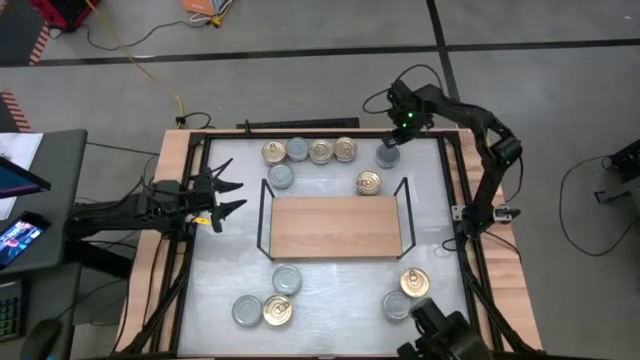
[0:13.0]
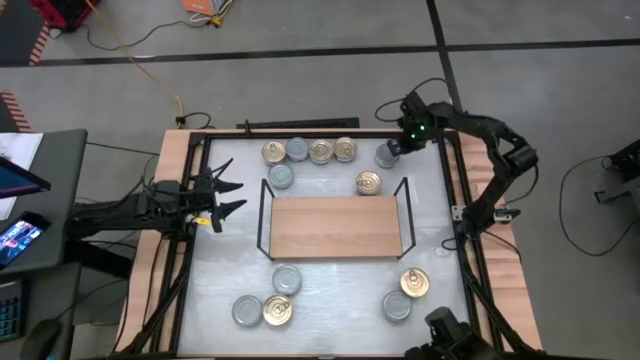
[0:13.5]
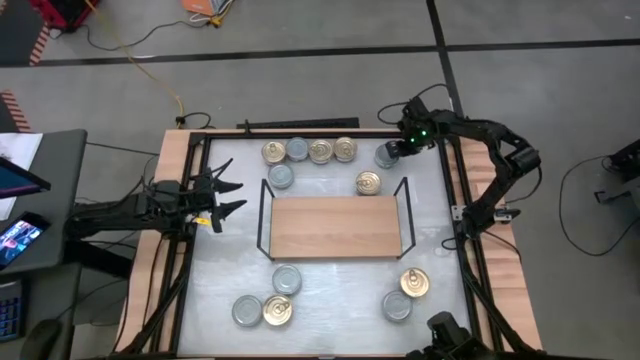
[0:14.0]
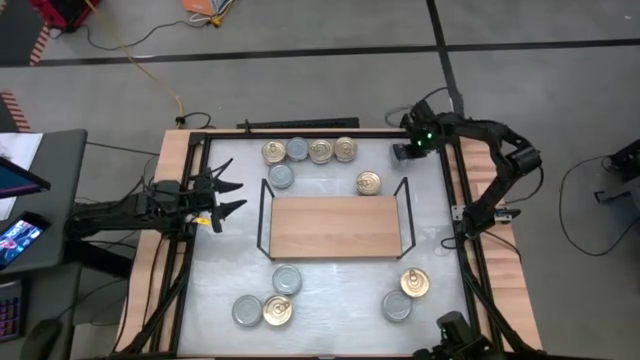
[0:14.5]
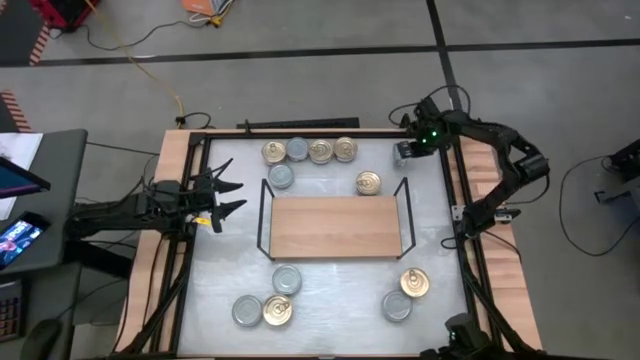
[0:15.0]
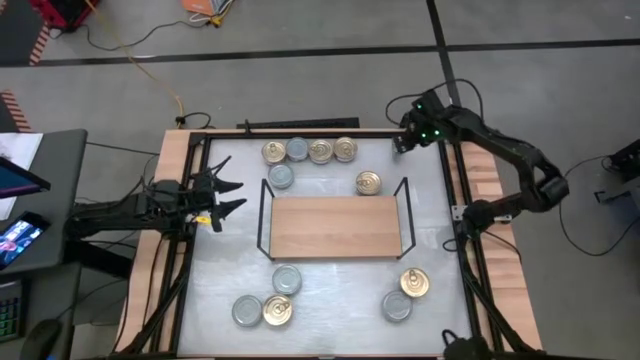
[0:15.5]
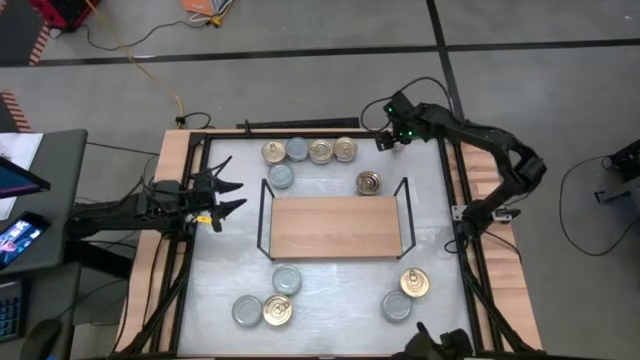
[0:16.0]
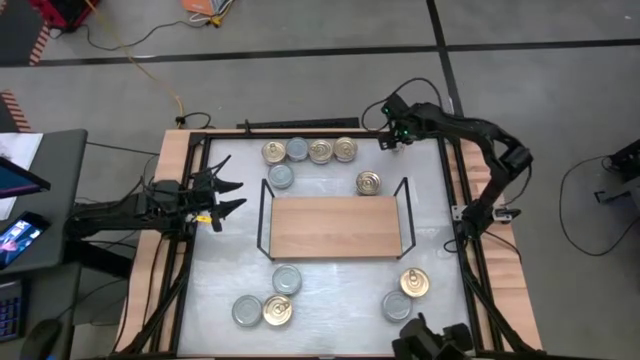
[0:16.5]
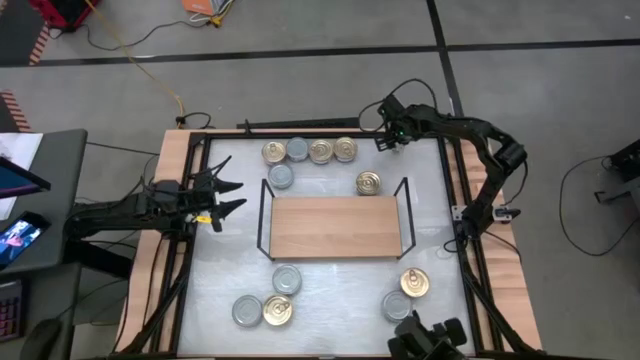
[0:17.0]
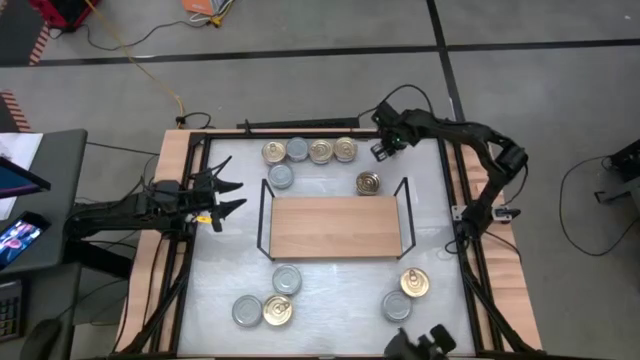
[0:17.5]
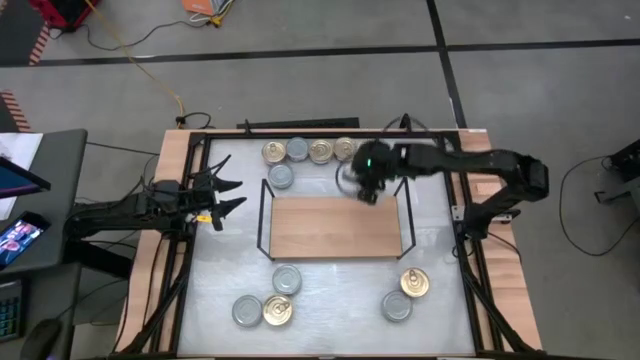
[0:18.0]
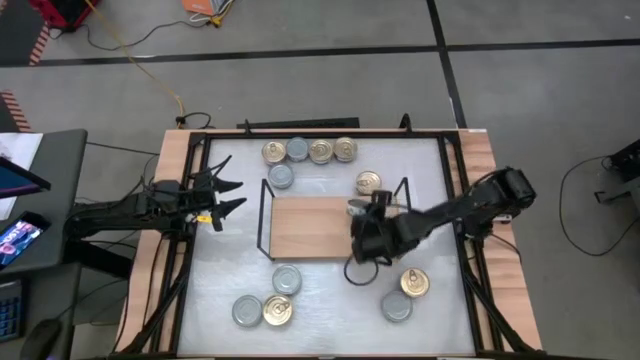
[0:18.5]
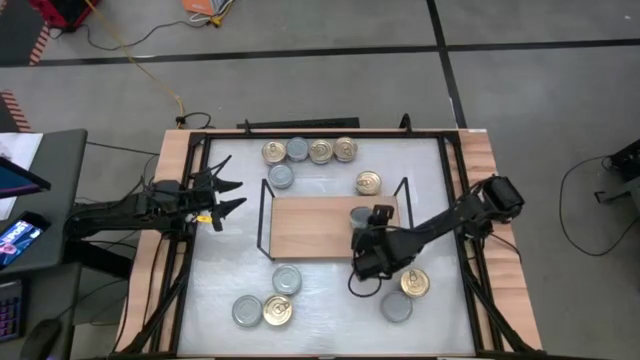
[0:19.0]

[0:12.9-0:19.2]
Task: Stack canned seafood by type on shelf
Put the green tuna can on the shelf

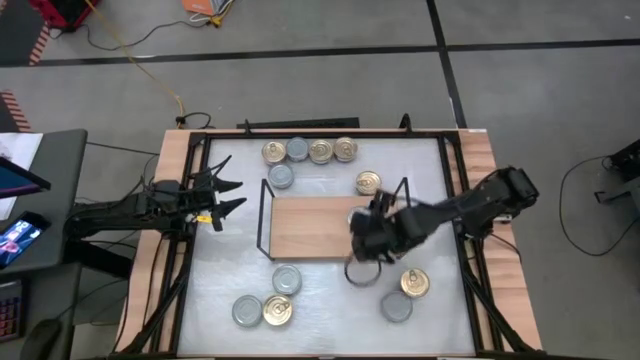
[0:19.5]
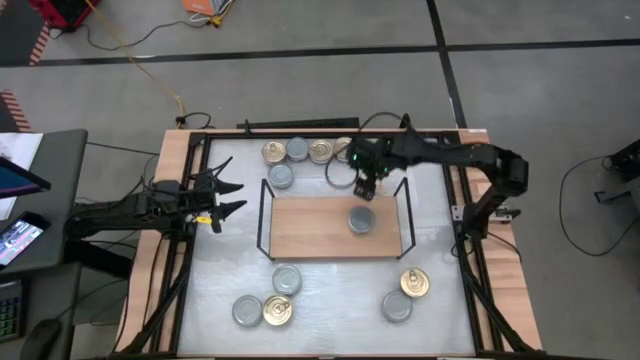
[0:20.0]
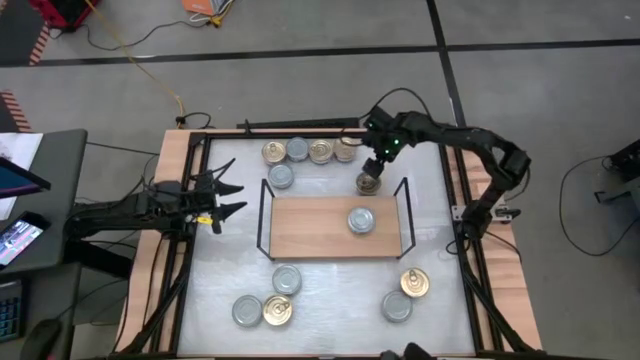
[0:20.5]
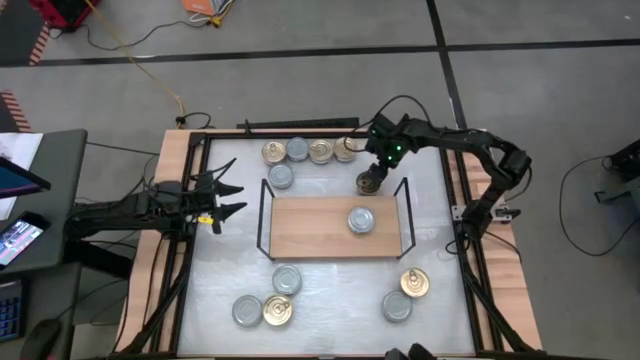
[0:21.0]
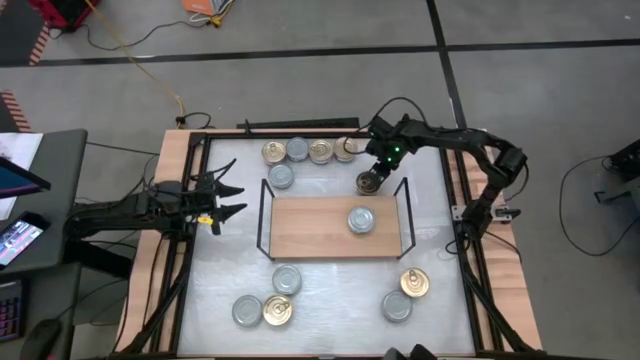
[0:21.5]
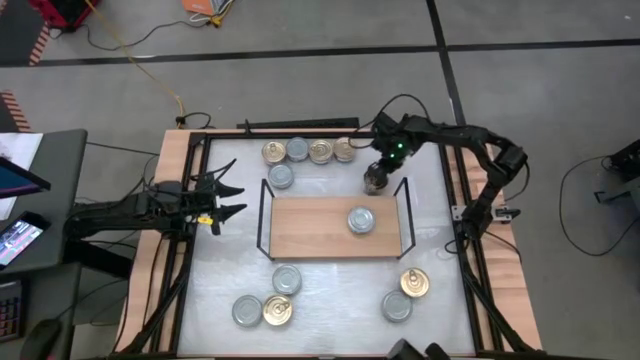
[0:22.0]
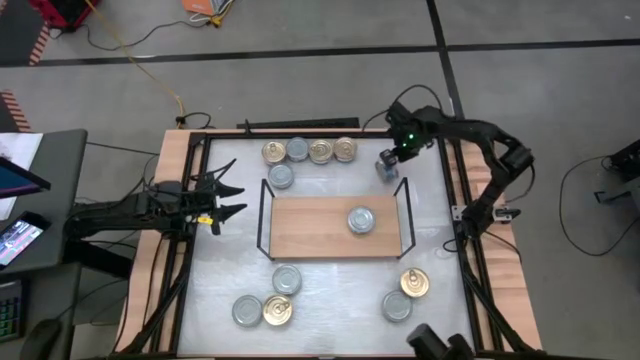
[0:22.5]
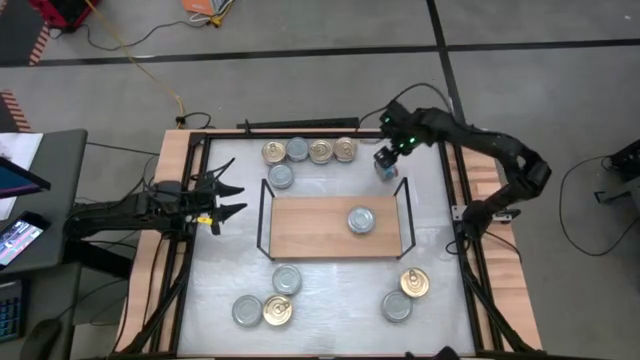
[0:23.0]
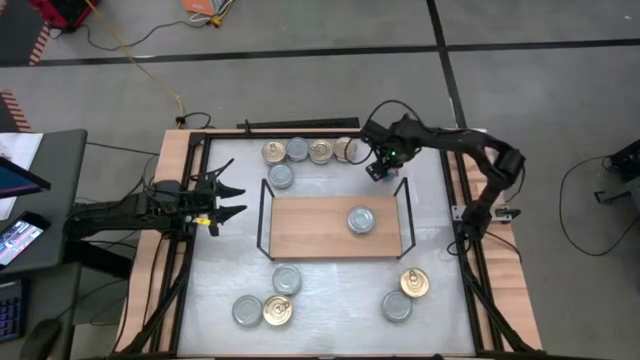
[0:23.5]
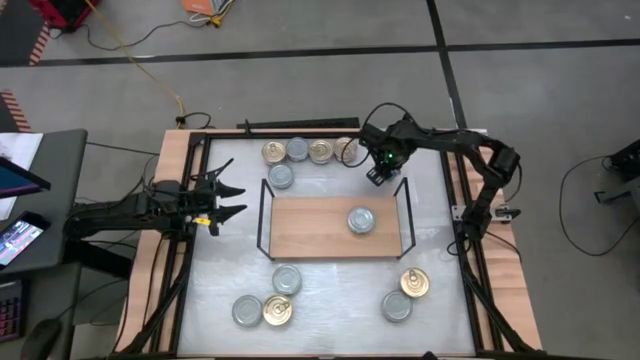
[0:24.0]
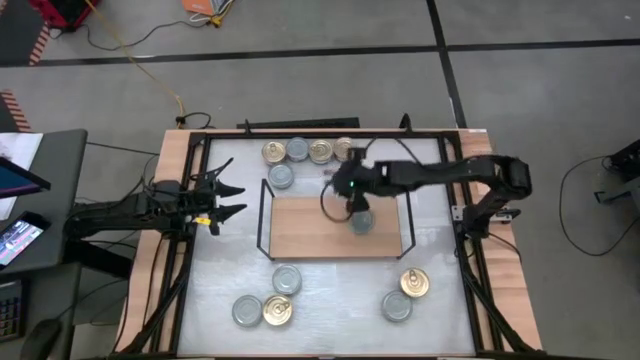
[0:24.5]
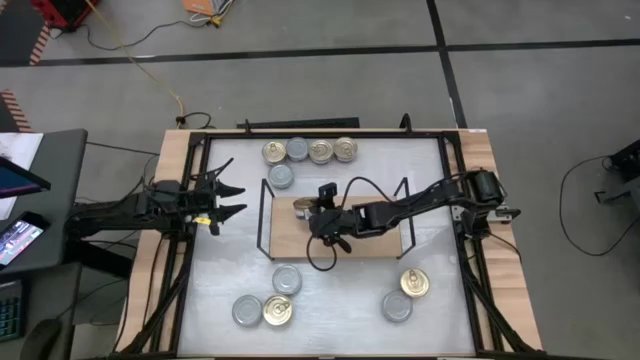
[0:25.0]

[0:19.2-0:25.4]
Put the blue tuna can on the shelf

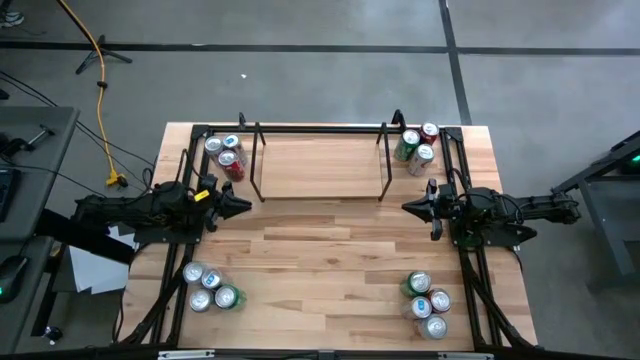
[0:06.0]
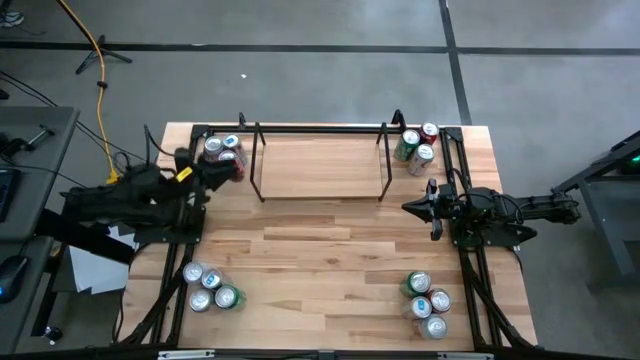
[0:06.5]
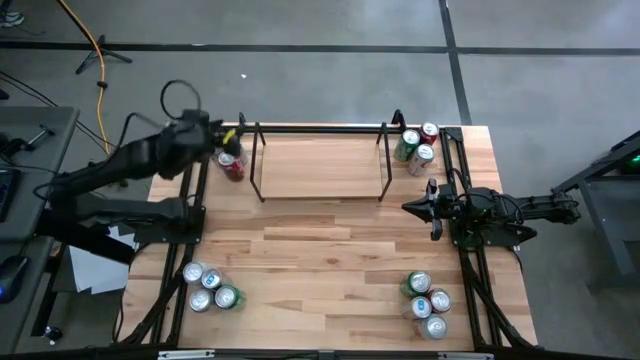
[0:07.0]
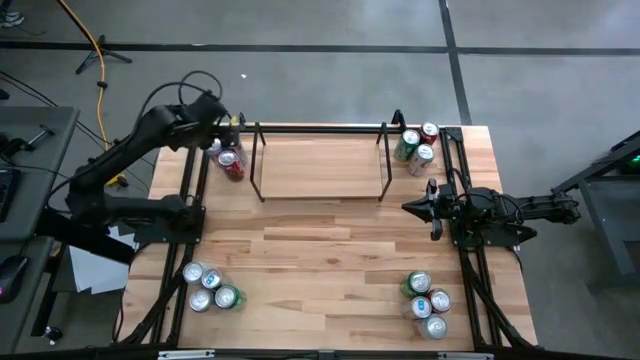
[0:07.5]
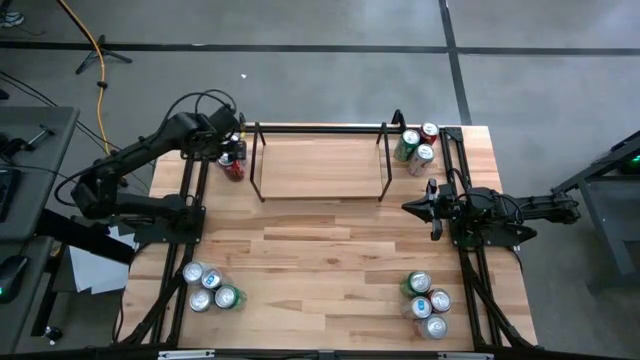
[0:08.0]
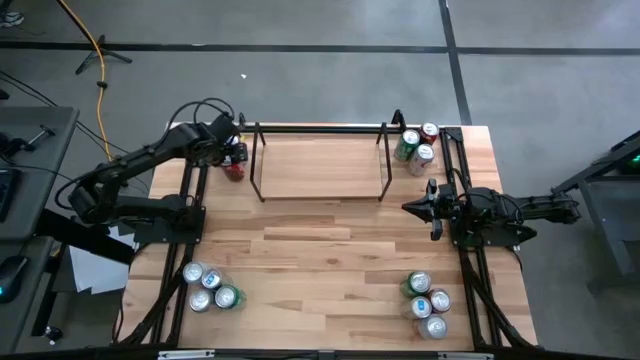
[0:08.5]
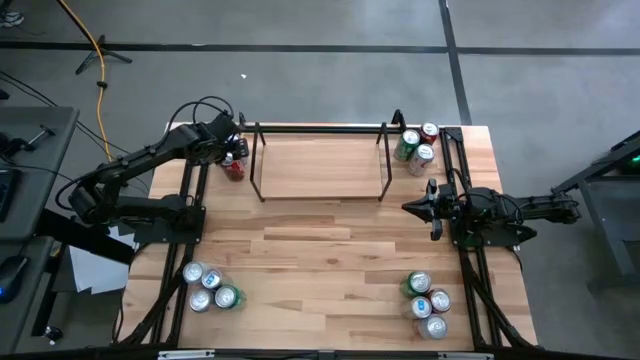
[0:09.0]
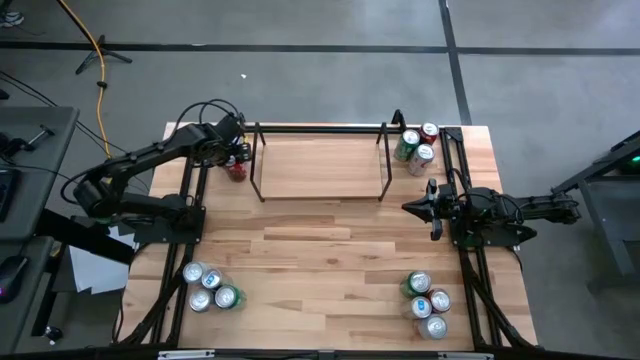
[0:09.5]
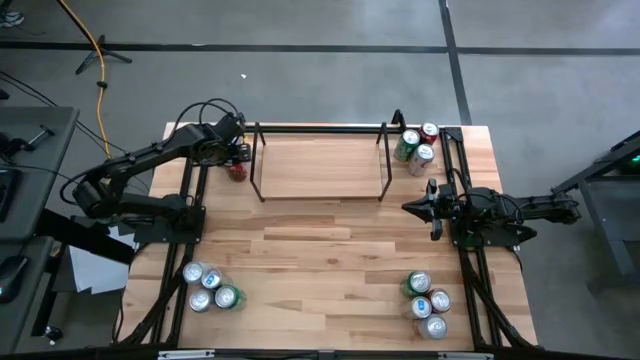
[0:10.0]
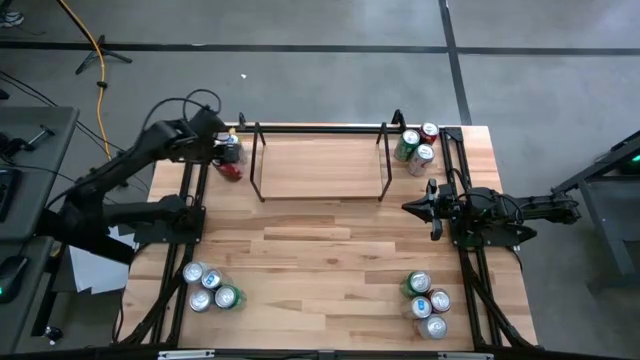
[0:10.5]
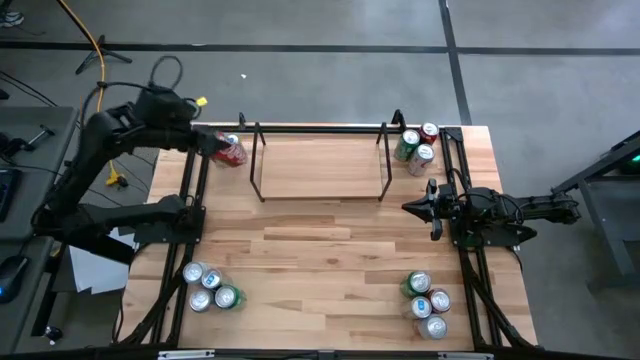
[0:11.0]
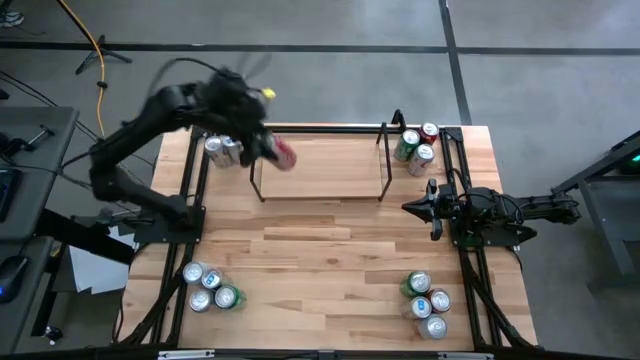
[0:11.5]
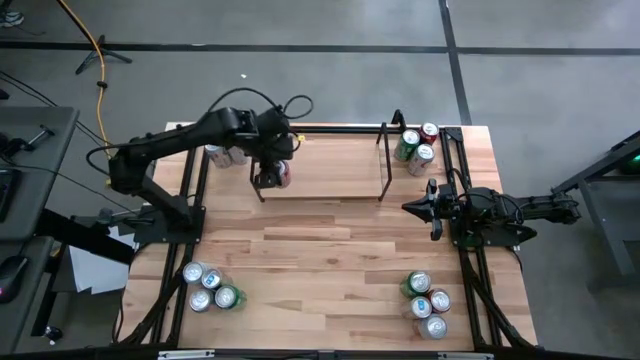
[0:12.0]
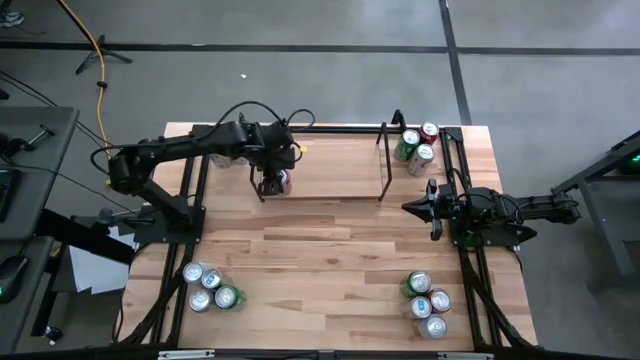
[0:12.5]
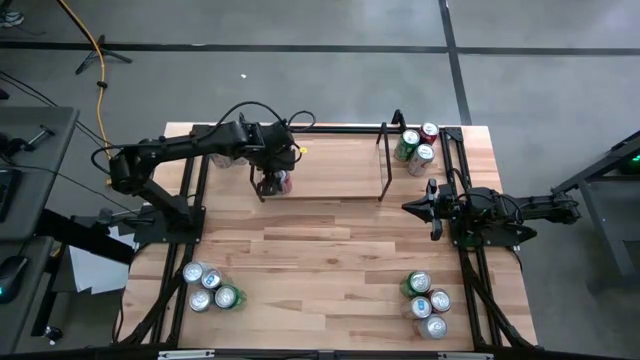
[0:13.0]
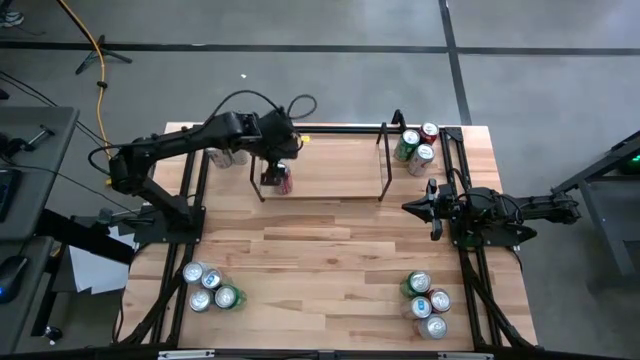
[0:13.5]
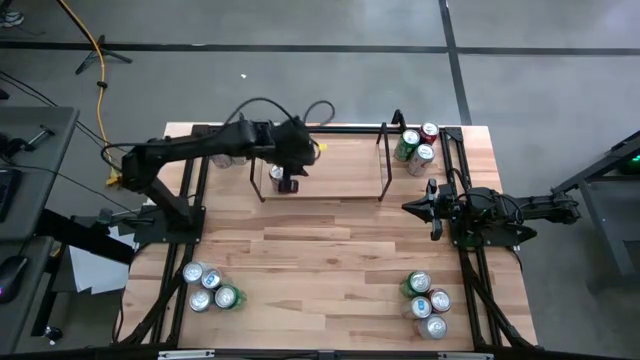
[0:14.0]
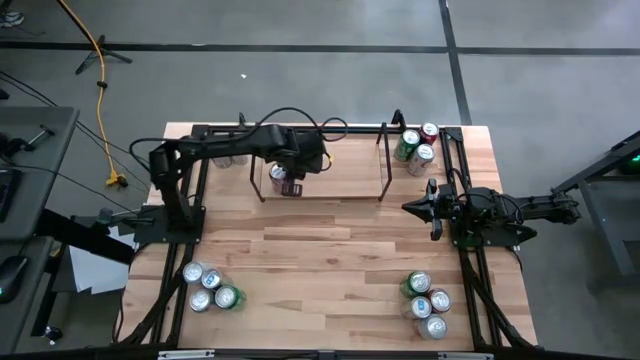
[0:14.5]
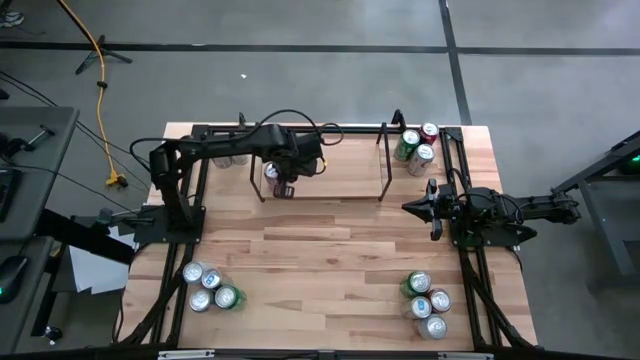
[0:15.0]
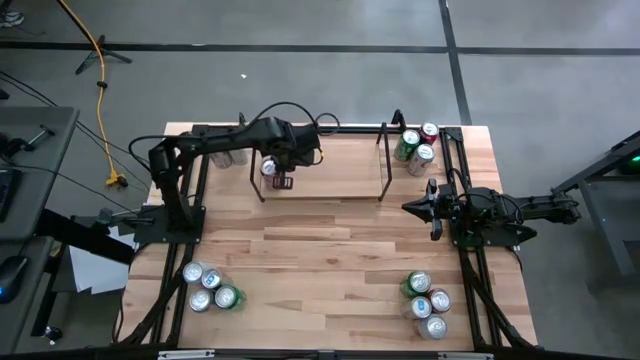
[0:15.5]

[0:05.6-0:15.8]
Task: Place canned beverage on shelf
Put the top left red soda can on the shelf
